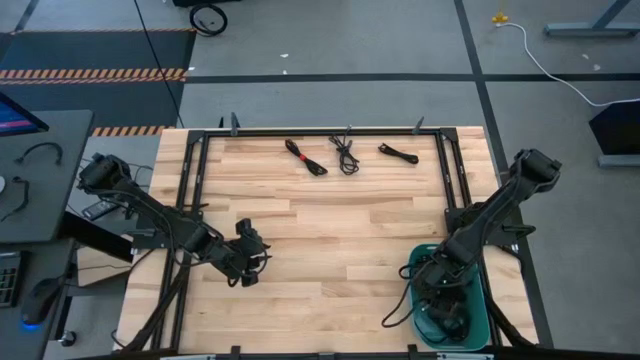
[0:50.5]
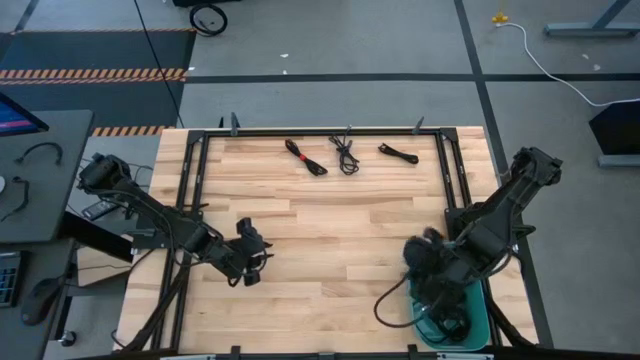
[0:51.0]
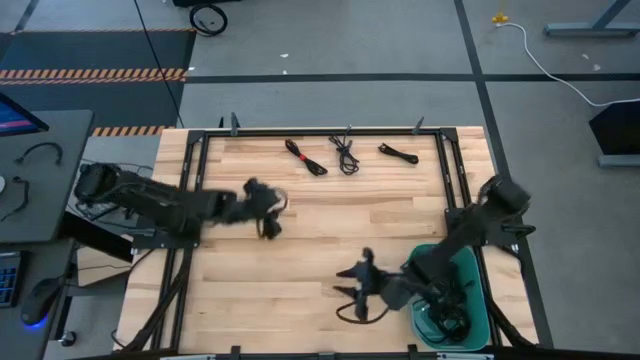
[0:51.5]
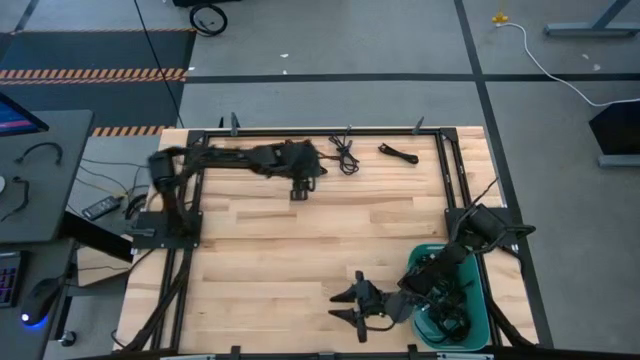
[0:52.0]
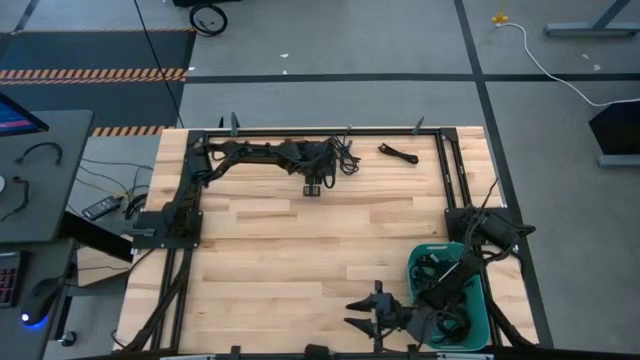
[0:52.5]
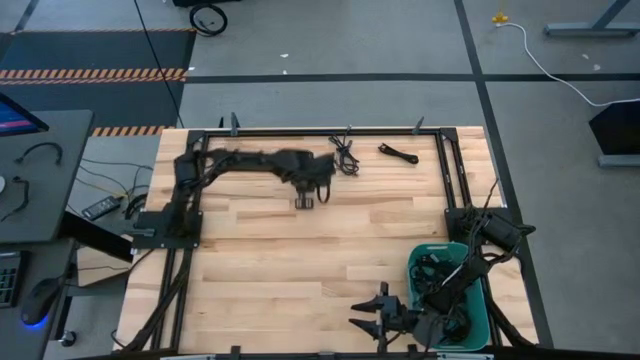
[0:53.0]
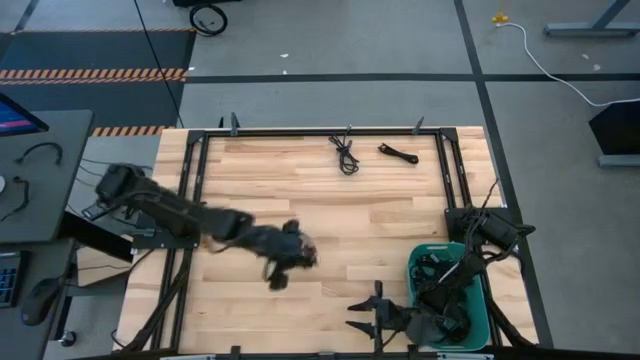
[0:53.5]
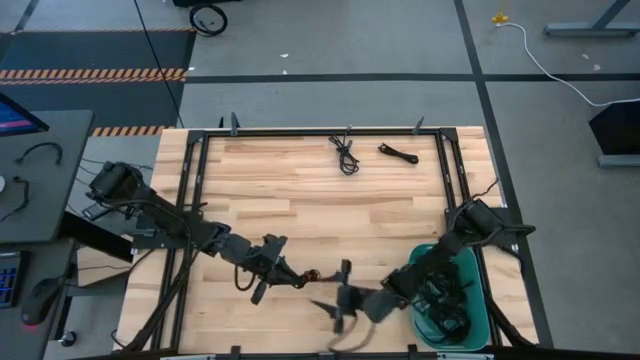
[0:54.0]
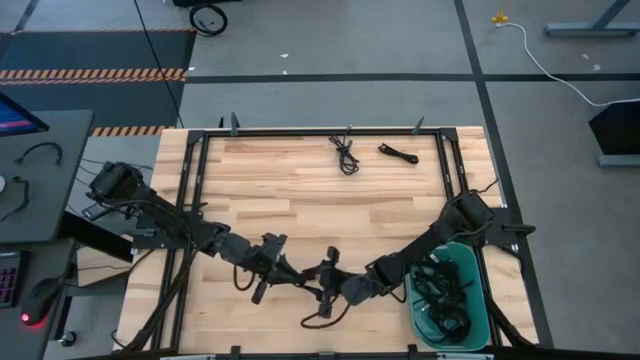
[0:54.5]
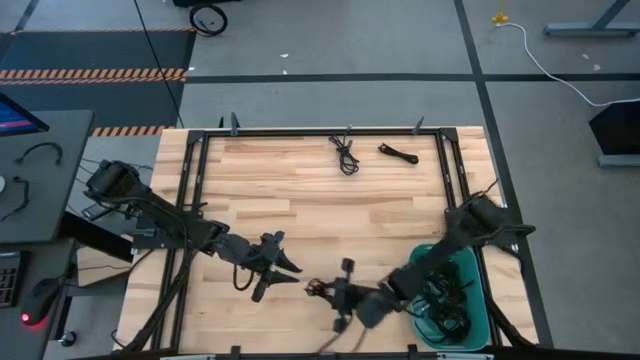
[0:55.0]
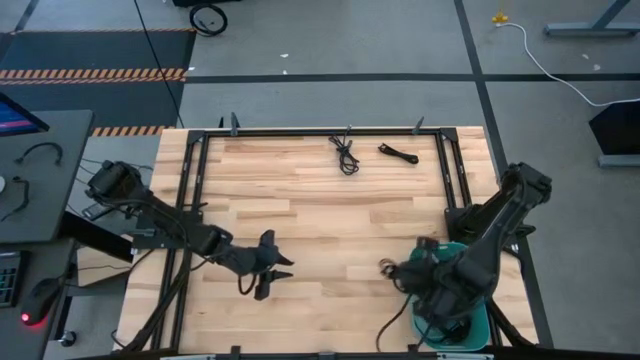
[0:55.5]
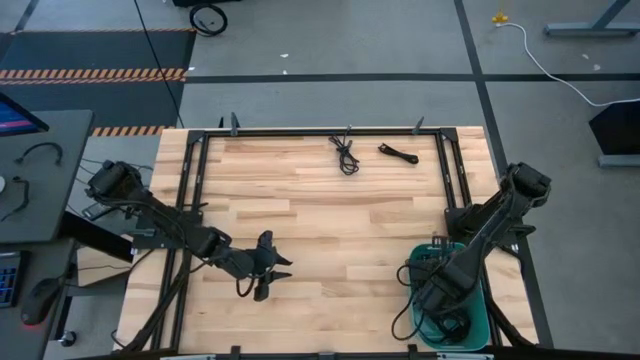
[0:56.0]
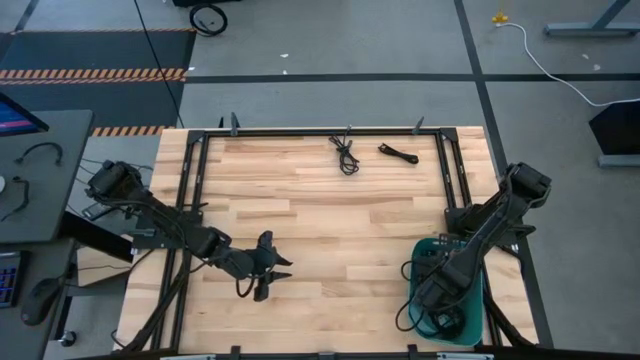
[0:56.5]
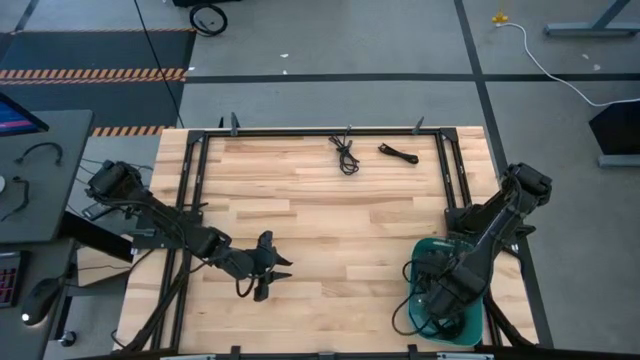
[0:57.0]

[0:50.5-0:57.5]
Task: Pick and place USB-C Cables
Put the black charger cable into the blue bin

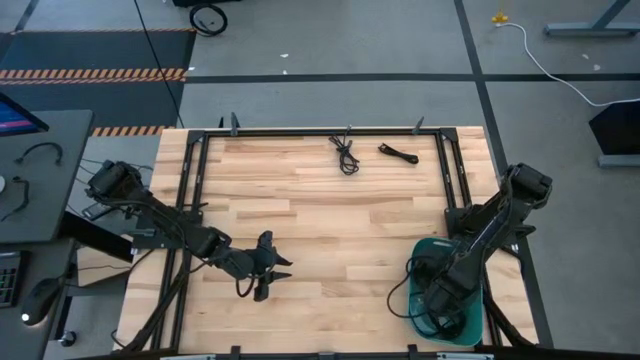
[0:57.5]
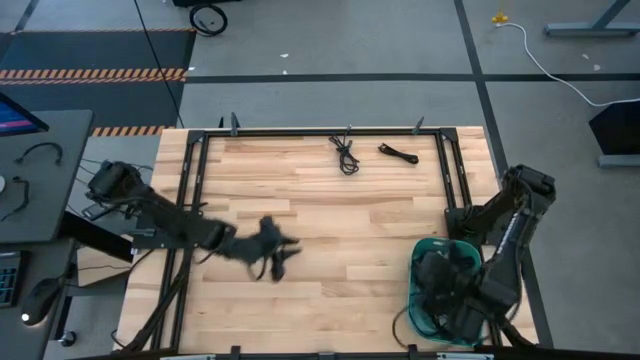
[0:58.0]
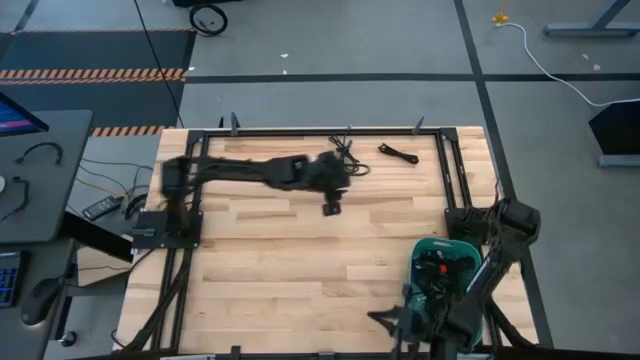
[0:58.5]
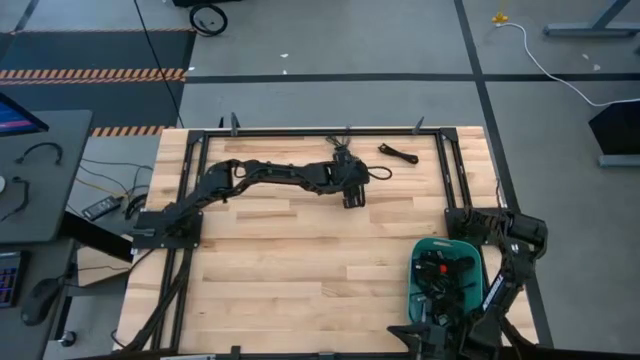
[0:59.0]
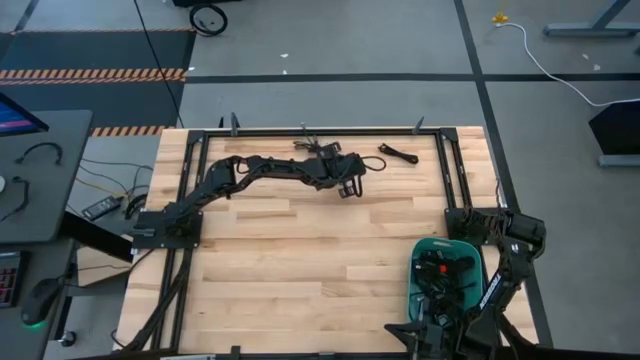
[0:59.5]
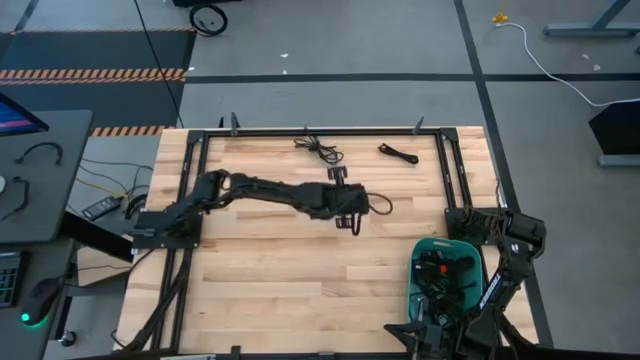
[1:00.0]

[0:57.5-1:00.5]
Put the black charger cable into the blue bin

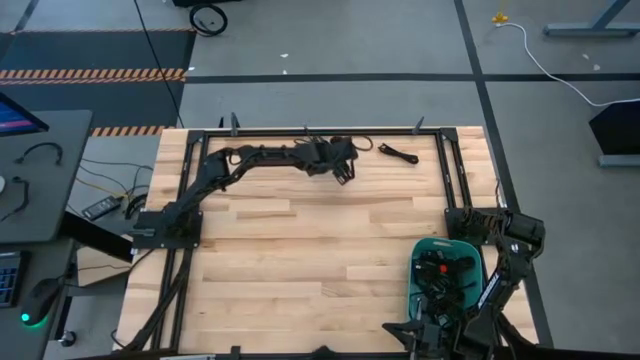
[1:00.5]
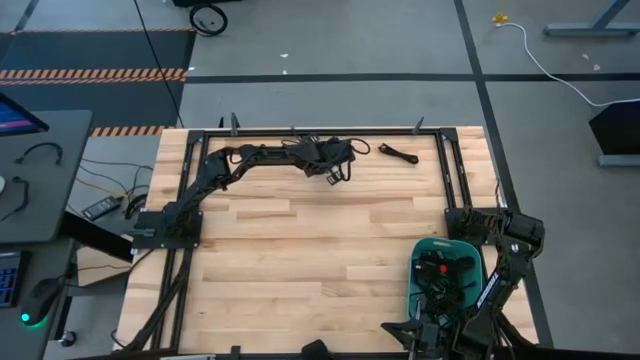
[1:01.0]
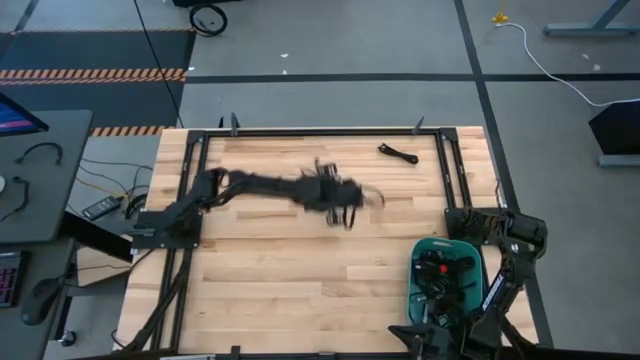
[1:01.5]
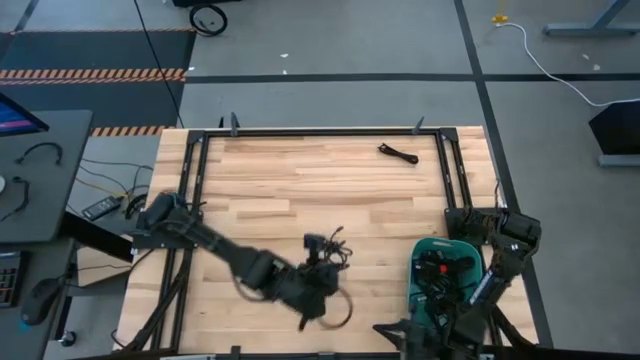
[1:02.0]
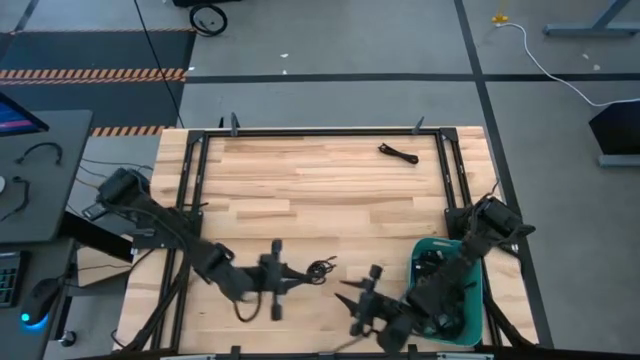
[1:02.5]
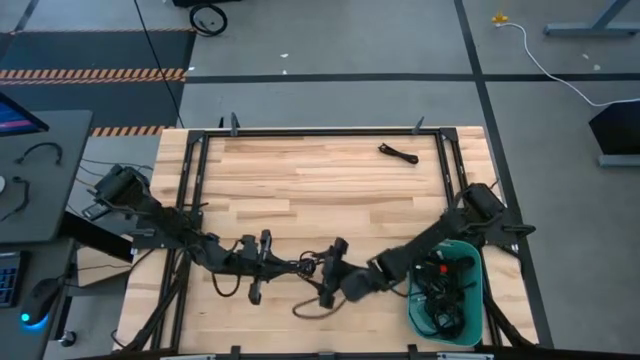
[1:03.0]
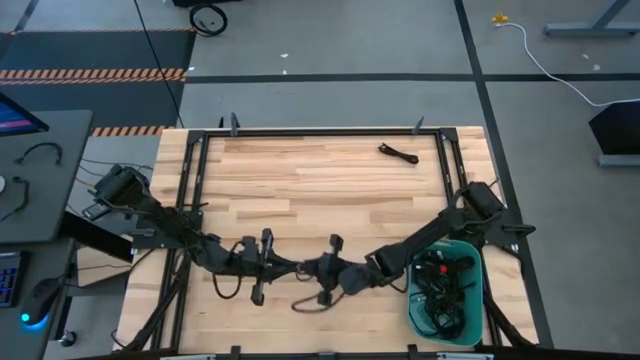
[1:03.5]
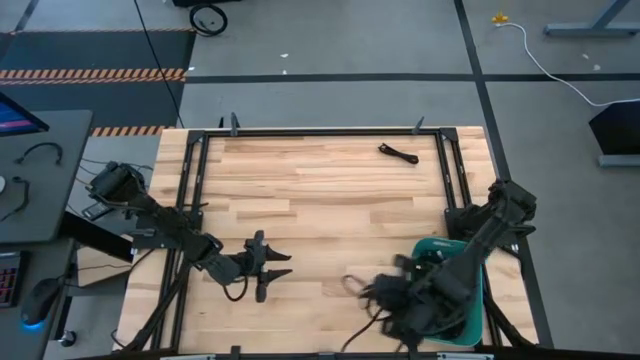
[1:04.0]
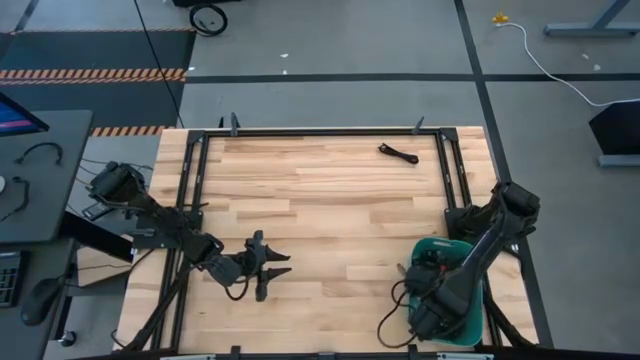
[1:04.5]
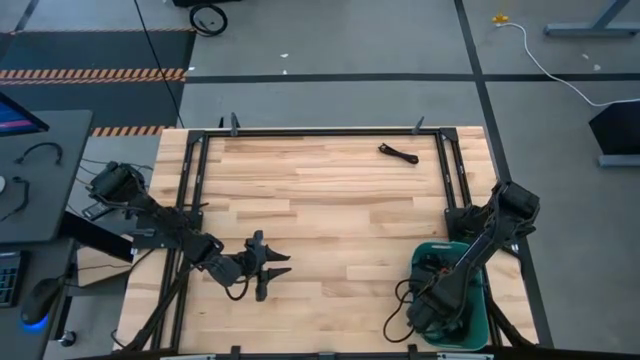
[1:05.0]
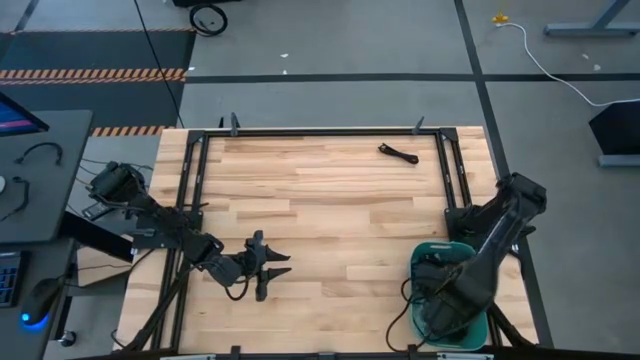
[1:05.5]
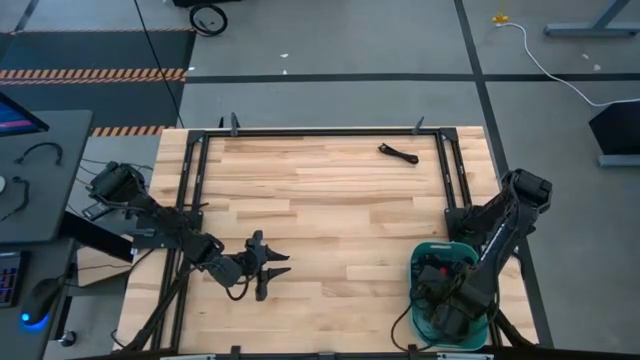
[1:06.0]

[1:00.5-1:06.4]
Put the black charger cable into the blue bin

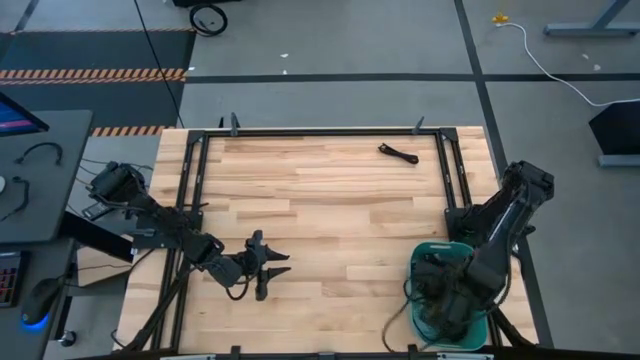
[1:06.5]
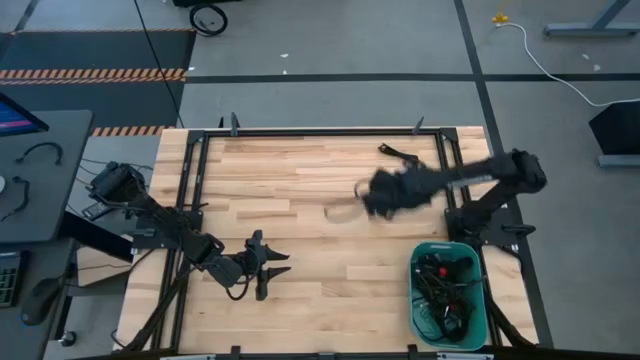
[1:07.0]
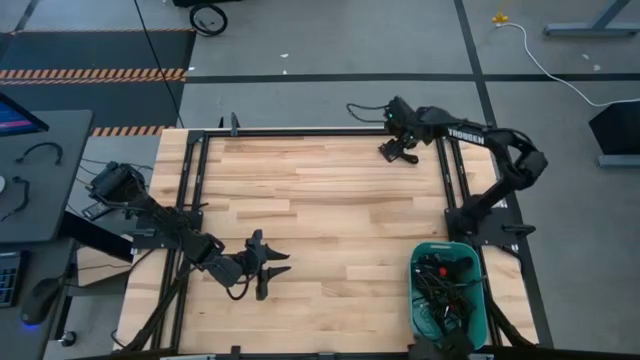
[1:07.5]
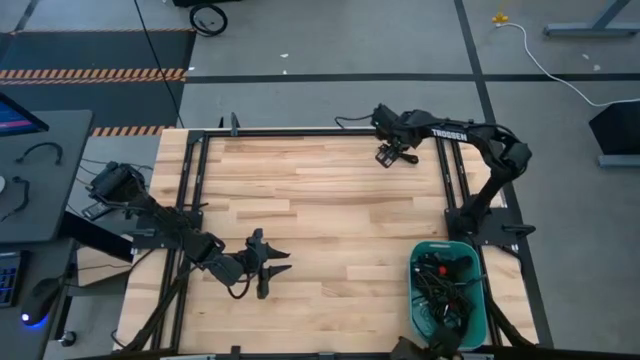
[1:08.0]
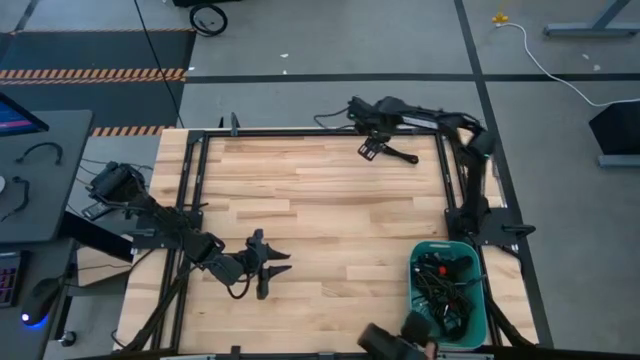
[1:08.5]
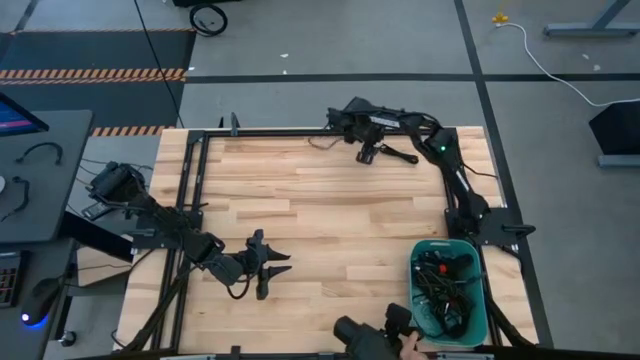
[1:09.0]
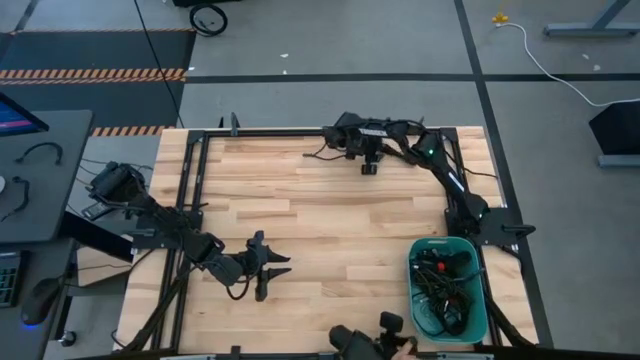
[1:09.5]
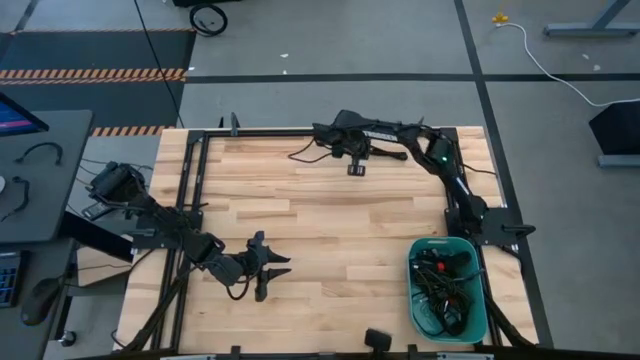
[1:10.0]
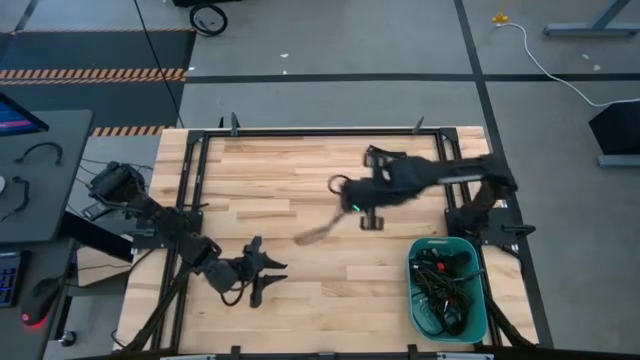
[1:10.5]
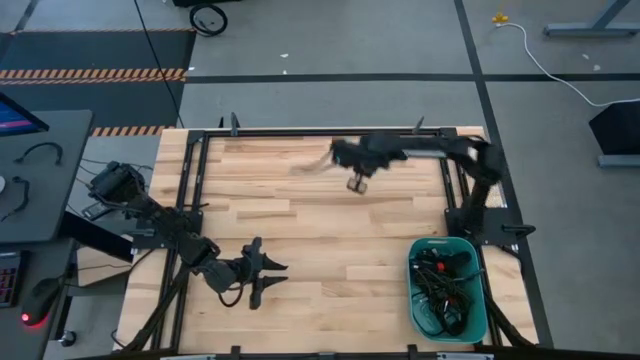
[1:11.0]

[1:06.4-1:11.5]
Put the black charger cable into the blue bin

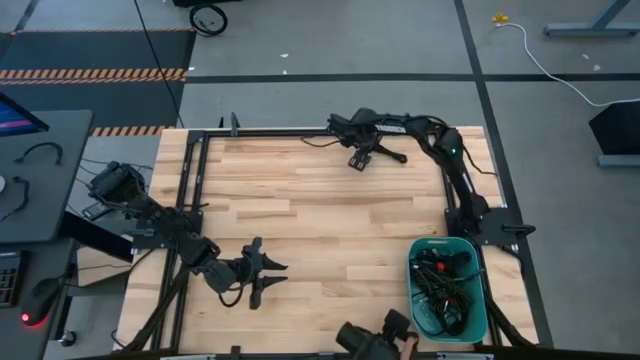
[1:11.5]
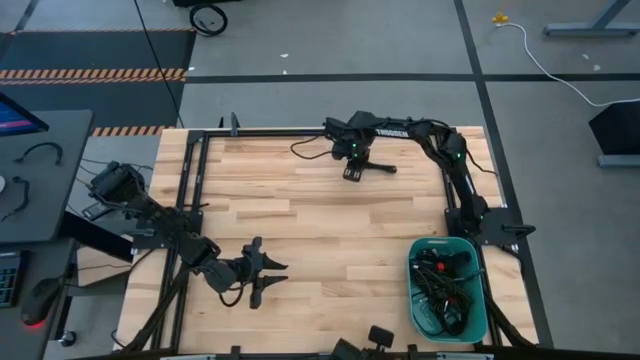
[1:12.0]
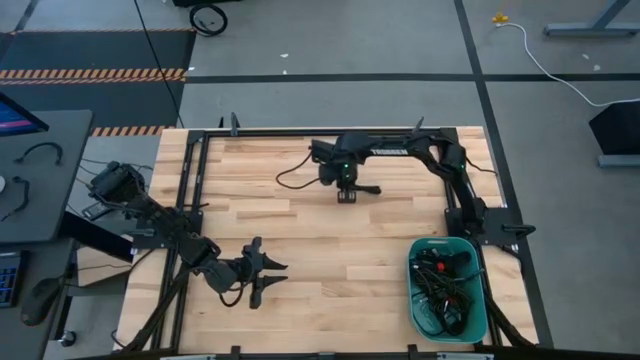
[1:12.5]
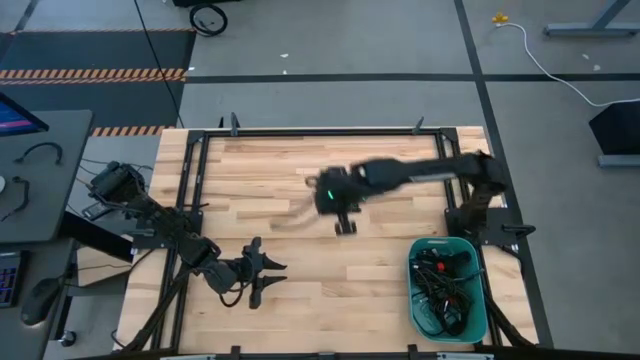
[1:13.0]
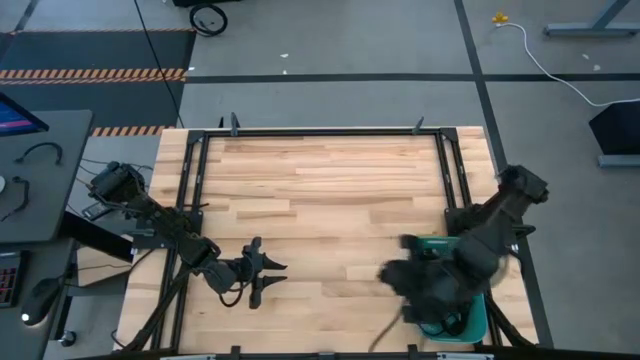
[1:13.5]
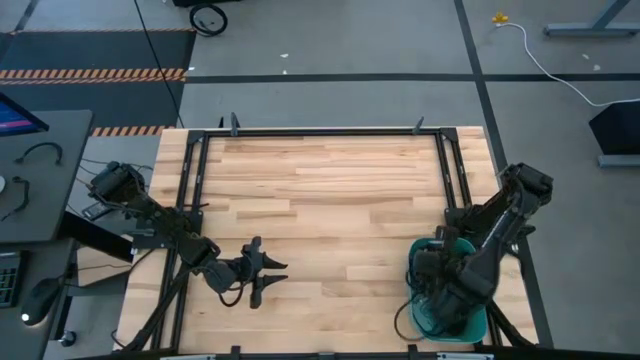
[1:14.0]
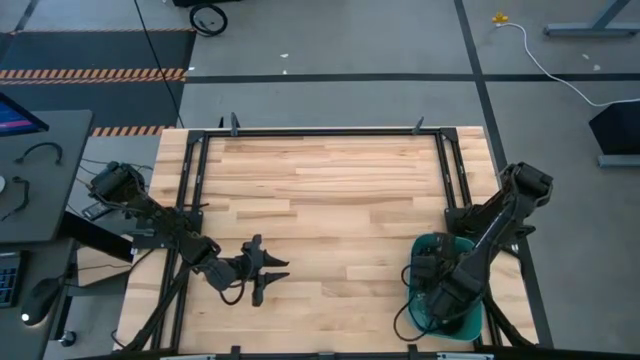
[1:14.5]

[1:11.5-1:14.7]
Put the black charger cable into the blue bin
